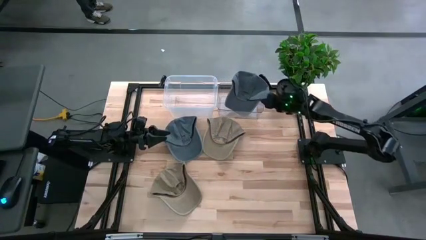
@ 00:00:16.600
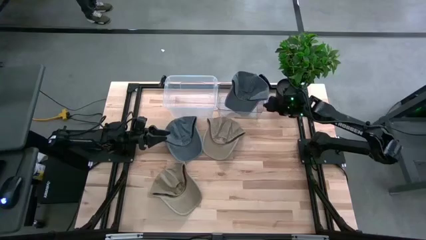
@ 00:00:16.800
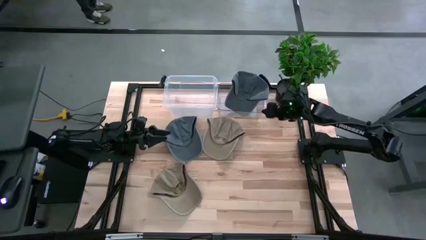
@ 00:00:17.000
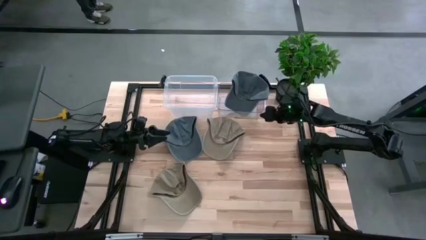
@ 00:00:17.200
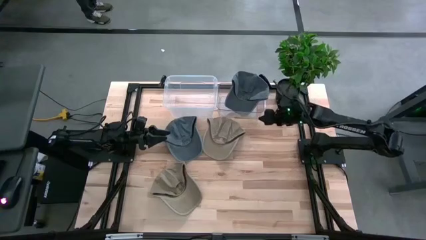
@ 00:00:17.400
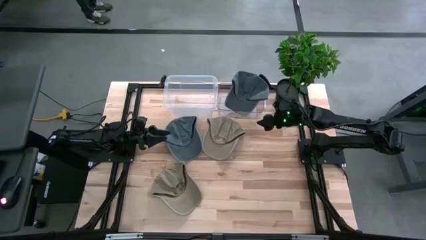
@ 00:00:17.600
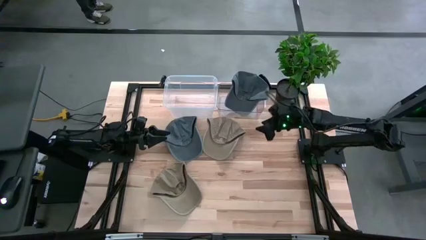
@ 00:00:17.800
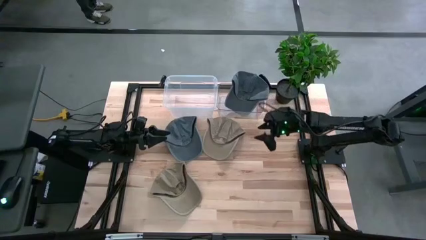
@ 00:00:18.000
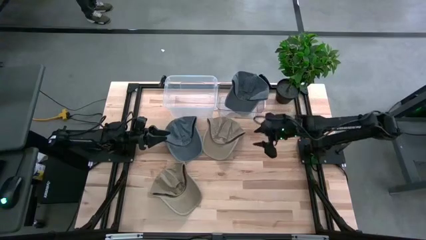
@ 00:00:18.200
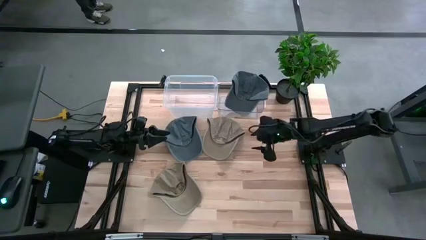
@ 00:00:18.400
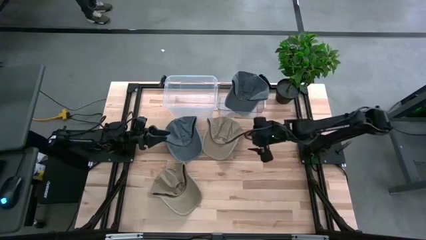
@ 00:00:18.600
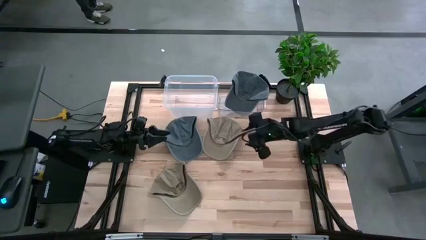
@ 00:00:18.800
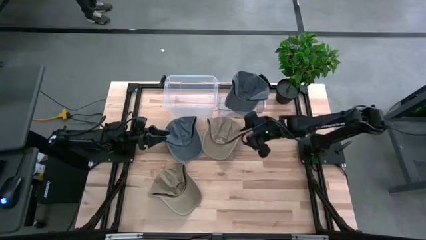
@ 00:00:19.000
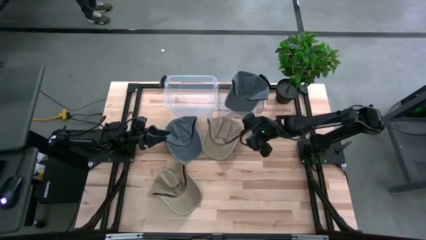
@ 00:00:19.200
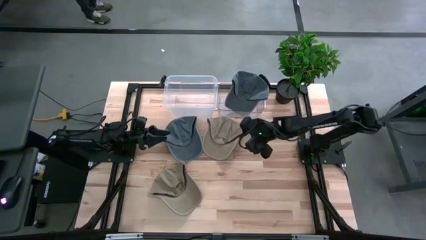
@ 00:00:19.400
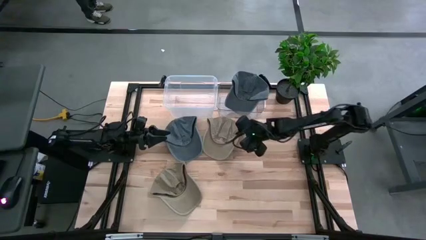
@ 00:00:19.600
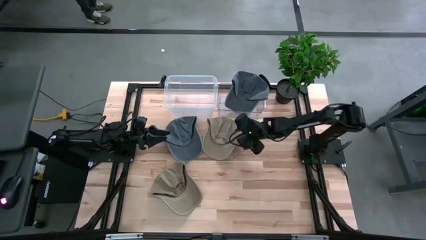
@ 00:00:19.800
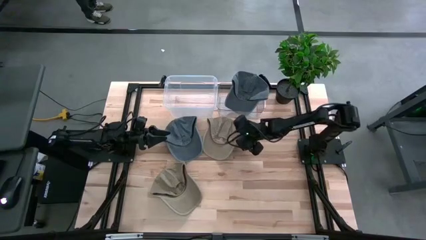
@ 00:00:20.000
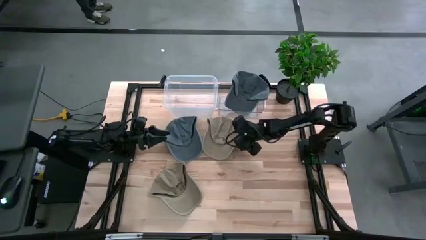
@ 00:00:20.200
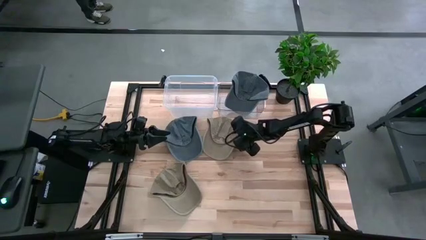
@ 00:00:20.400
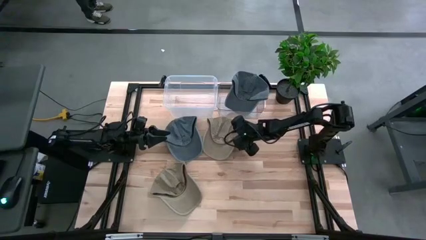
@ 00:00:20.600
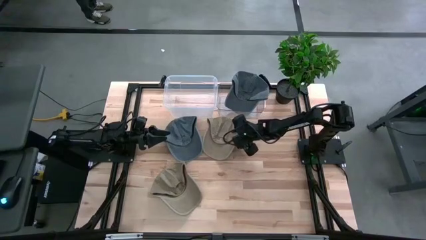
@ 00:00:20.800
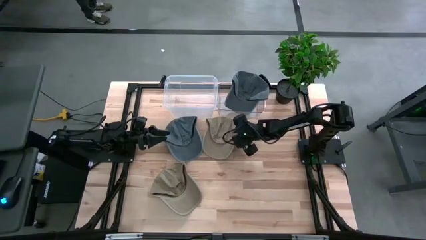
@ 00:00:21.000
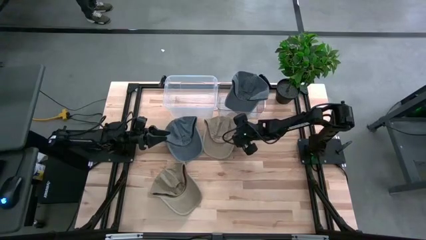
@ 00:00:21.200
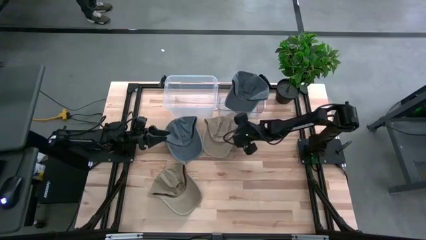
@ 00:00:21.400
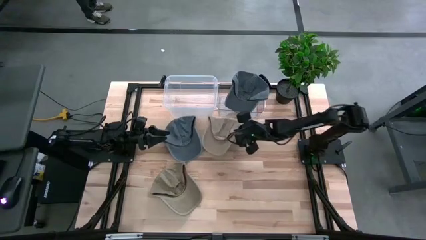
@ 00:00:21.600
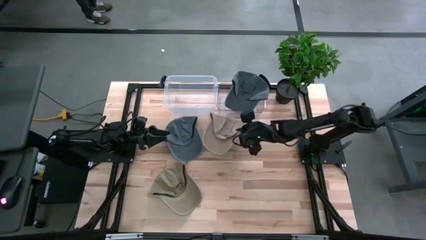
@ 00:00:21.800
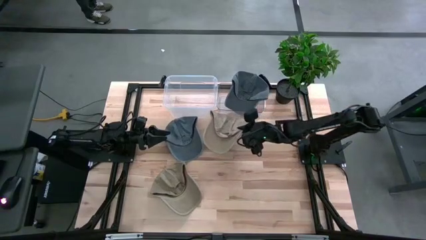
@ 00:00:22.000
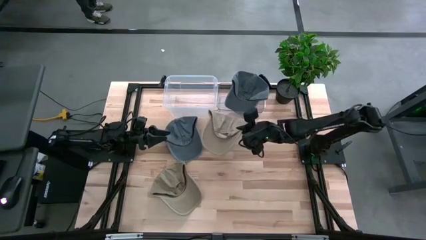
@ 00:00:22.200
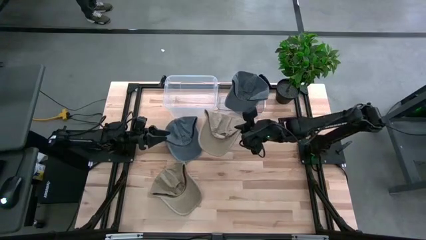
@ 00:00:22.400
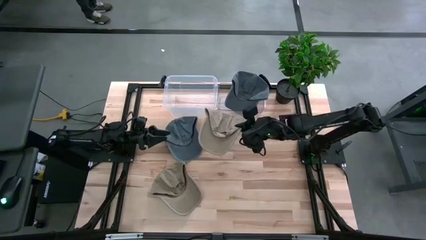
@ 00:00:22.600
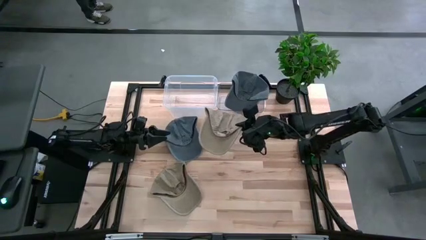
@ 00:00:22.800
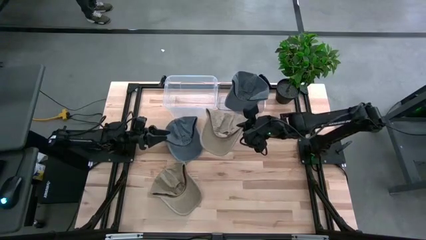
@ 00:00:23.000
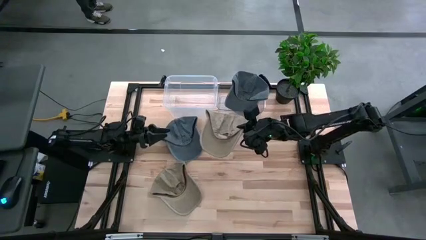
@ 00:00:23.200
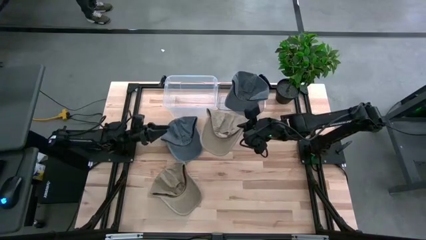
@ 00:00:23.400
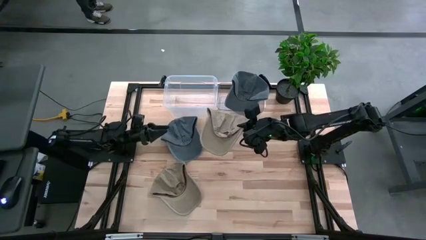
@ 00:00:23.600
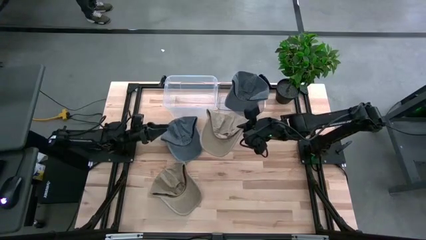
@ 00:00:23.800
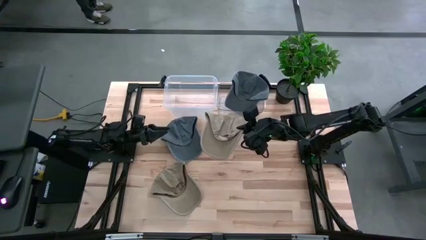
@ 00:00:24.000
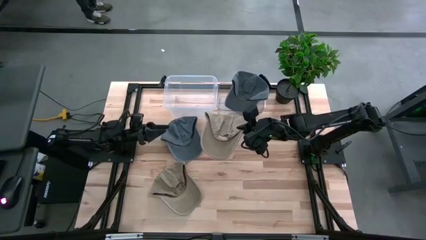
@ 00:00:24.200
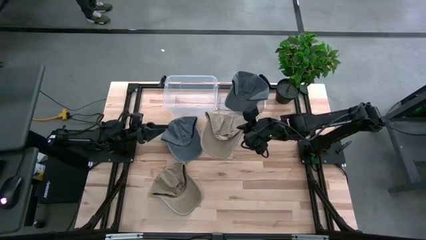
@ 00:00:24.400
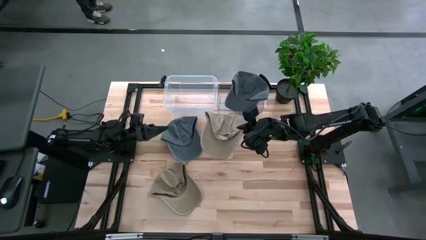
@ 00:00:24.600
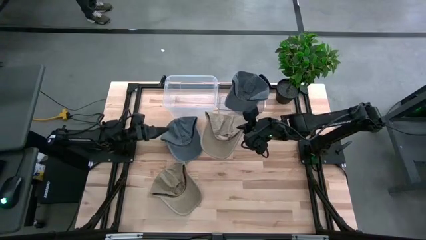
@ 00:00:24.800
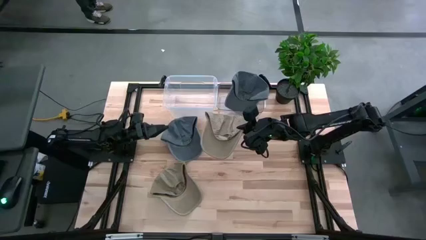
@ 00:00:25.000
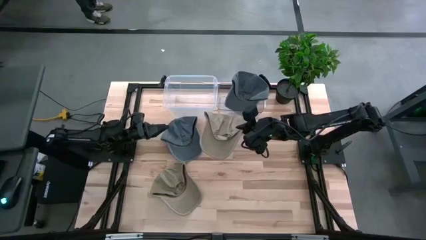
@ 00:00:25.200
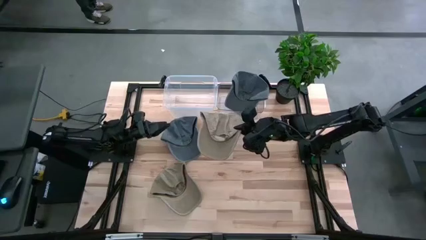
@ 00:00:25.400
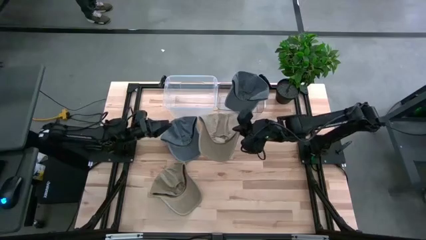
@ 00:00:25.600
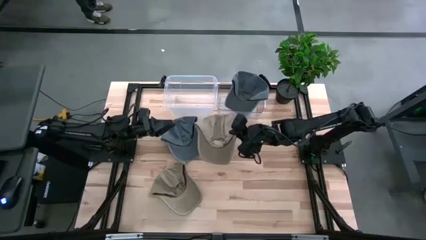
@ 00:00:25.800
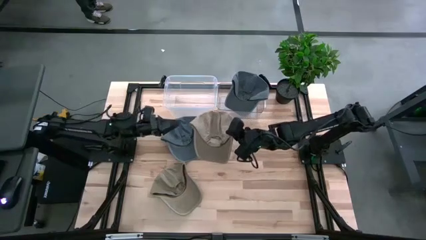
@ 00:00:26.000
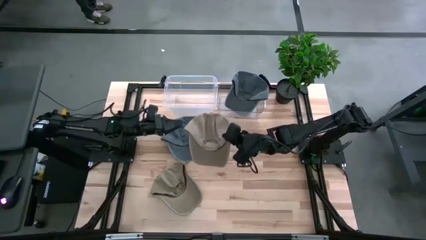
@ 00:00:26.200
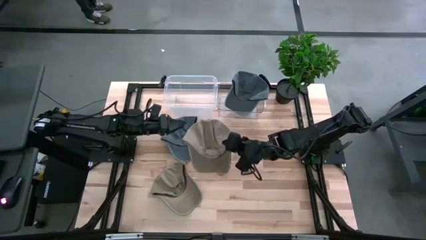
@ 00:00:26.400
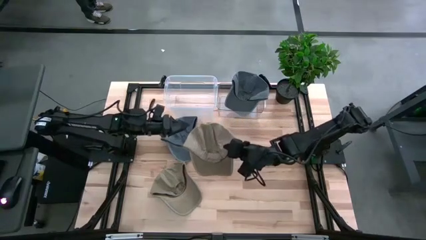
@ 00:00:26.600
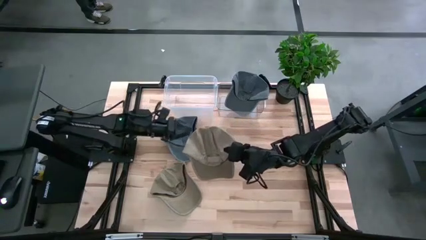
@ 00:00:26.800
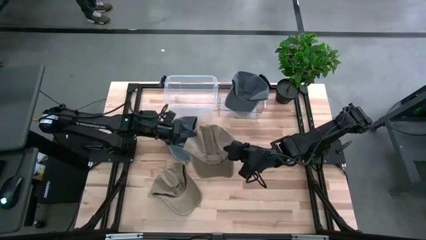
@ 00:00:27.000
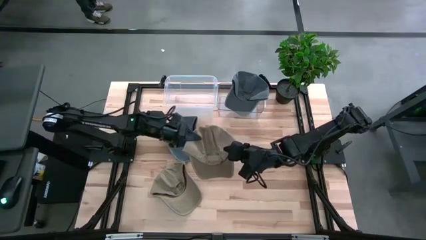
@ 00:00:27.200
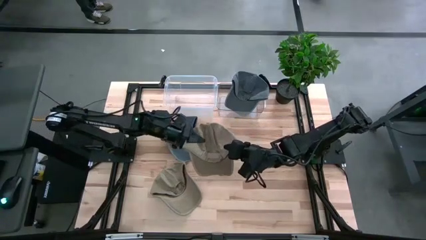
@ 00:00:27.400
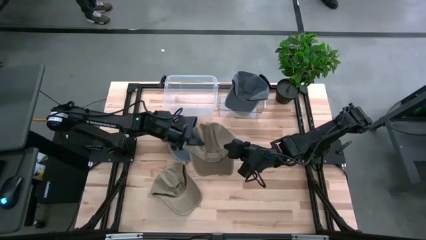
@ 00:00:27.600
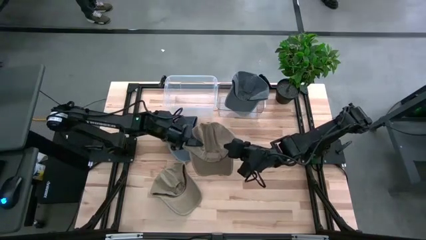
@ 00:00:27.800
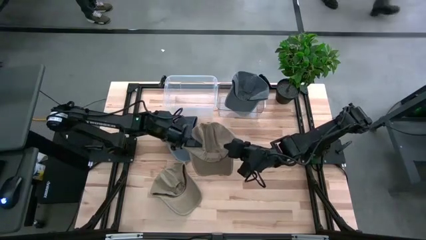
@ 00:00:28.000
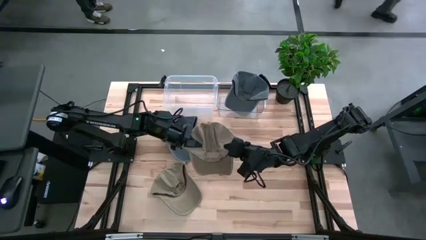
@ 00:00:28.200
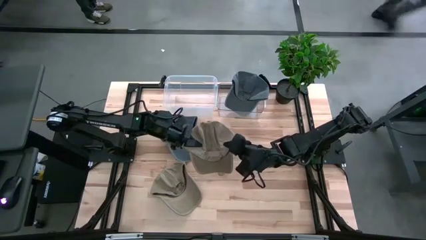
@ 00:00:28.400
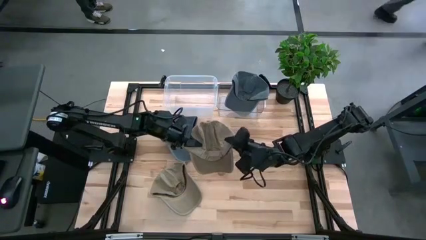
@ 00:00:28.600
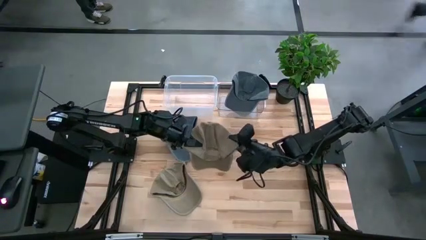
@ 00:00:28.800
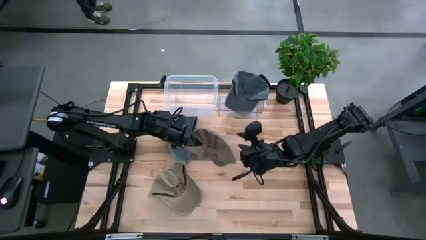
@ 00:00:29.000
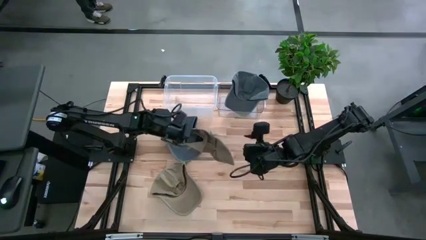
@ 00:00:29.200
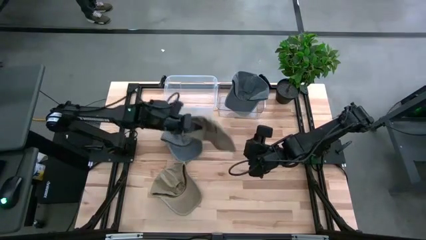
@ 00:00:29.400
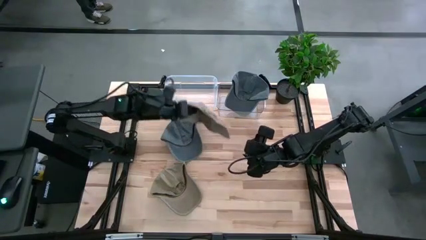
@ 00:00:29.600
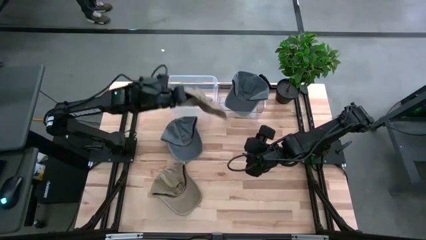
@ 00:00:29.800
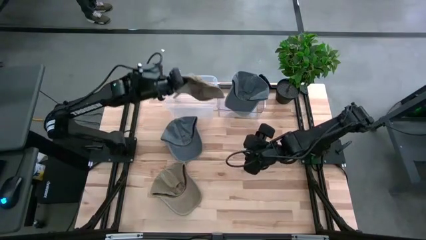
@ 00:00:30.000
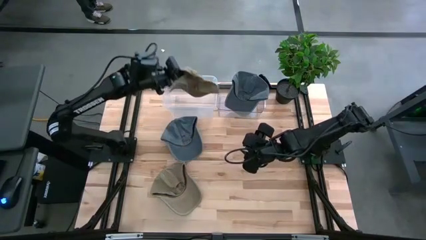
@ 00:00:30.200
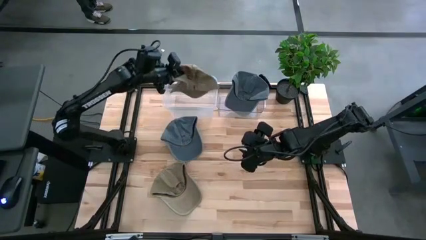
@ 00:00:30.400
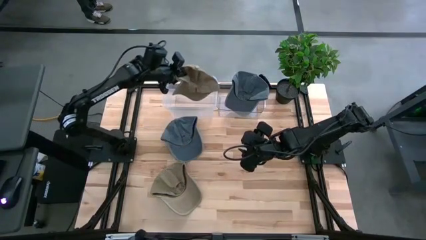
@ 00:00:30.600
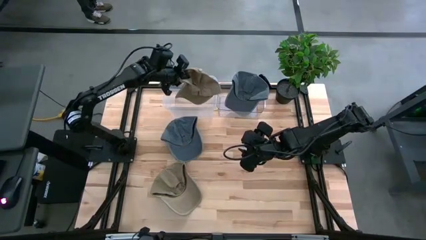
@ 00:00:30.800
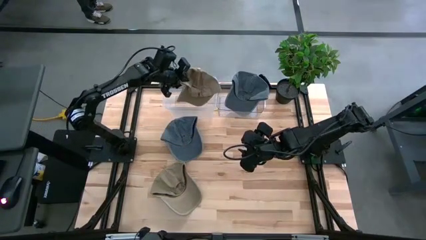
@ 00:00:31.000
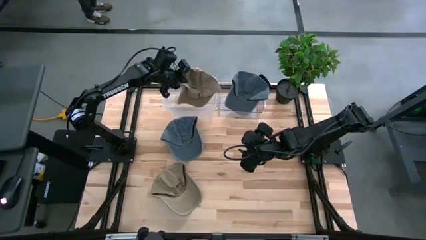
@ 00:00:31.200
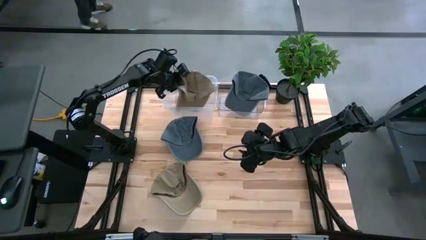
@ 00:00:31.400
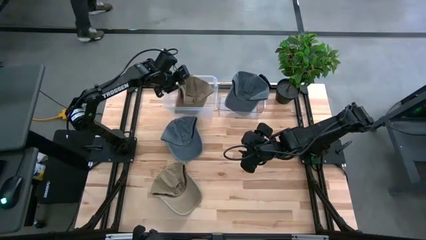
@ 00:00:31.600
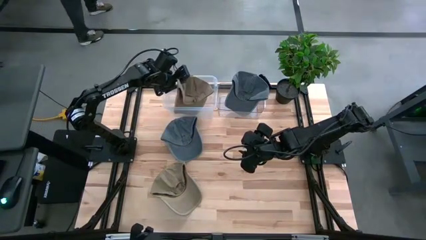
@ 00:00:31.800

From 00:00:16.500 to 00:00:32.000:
Task: Pick & Place hat
Put the top brown cap into the white bin
